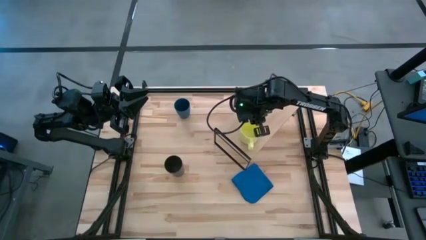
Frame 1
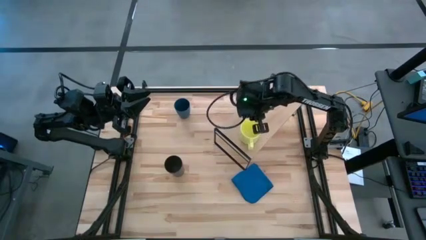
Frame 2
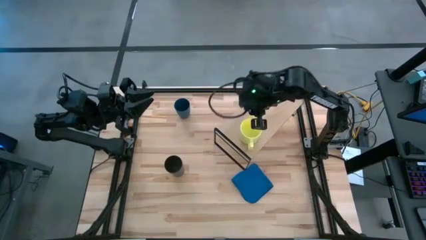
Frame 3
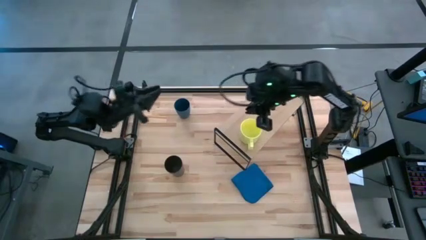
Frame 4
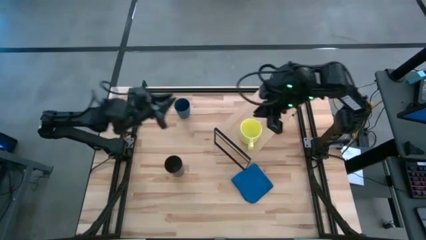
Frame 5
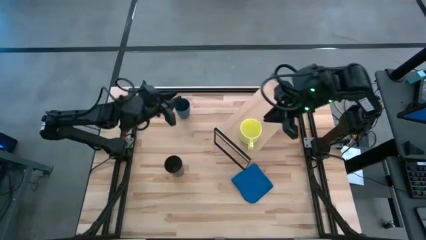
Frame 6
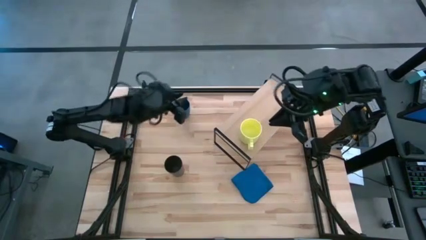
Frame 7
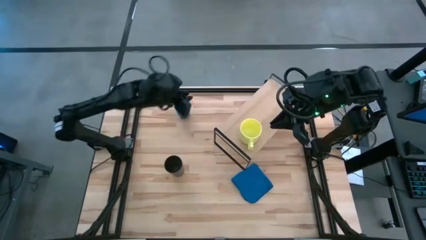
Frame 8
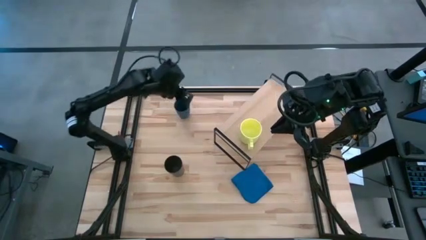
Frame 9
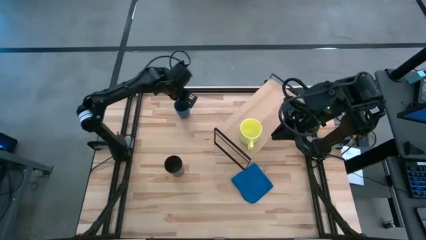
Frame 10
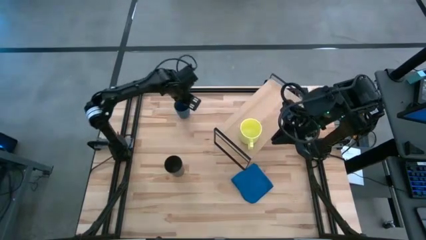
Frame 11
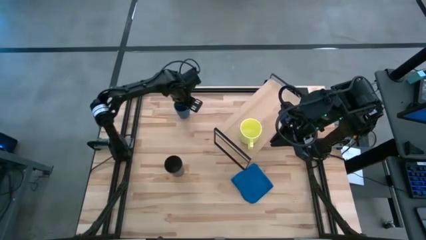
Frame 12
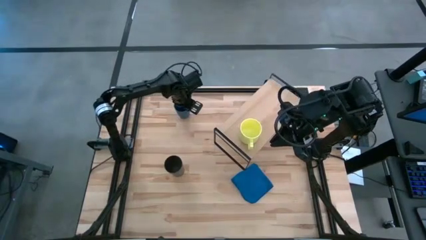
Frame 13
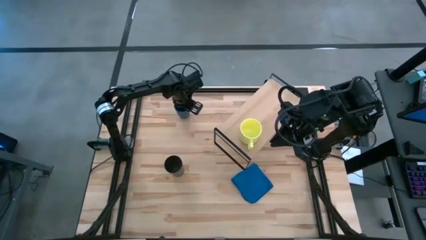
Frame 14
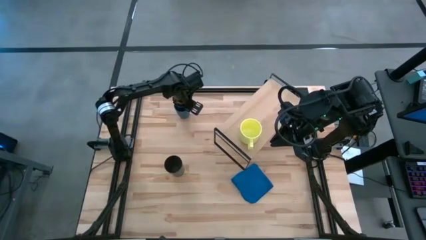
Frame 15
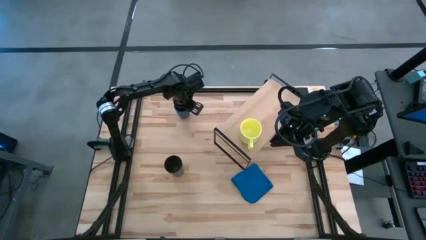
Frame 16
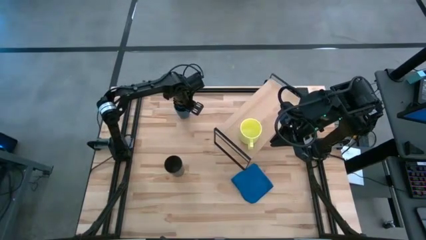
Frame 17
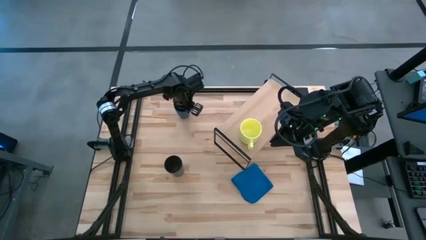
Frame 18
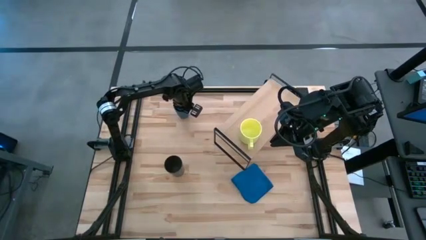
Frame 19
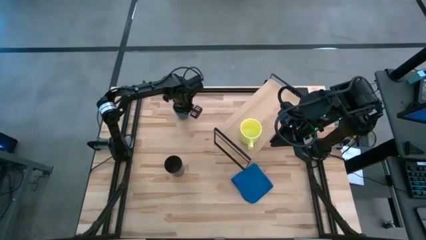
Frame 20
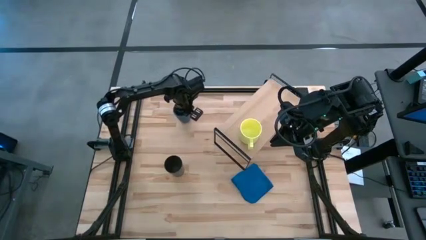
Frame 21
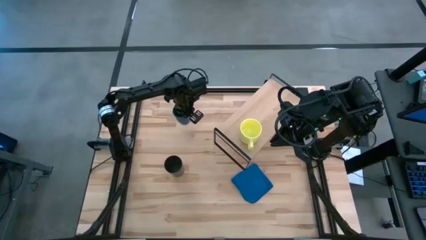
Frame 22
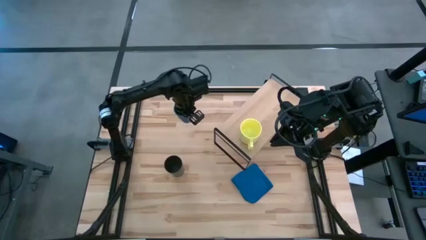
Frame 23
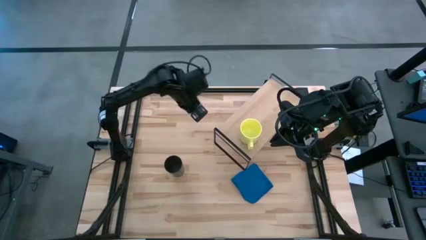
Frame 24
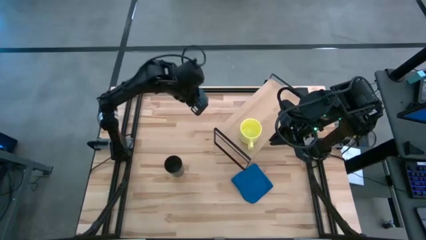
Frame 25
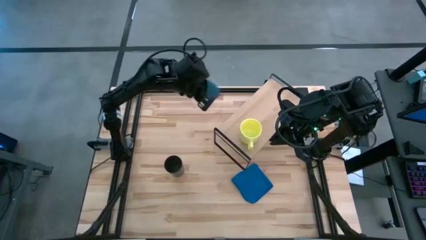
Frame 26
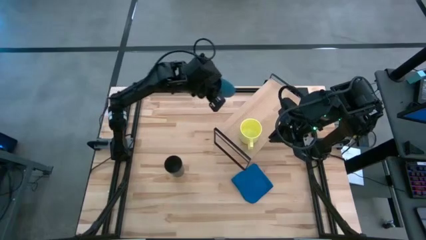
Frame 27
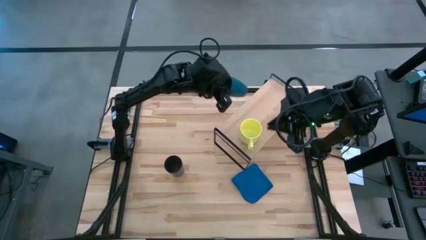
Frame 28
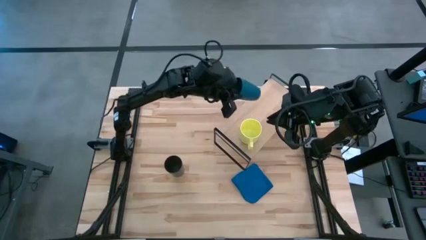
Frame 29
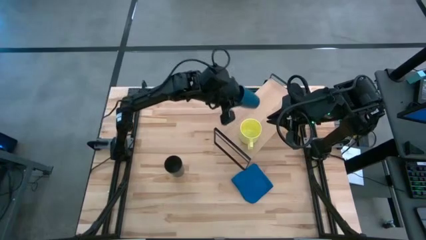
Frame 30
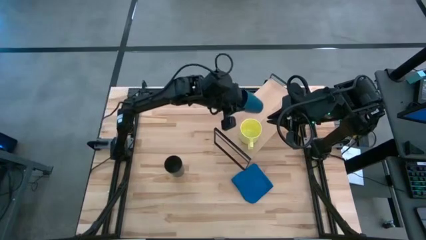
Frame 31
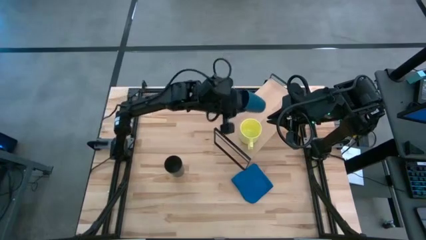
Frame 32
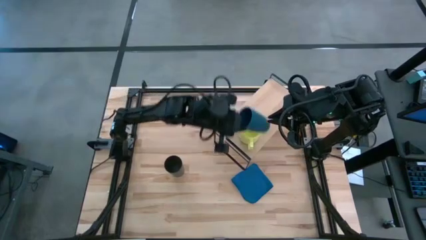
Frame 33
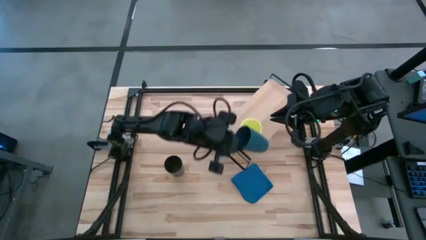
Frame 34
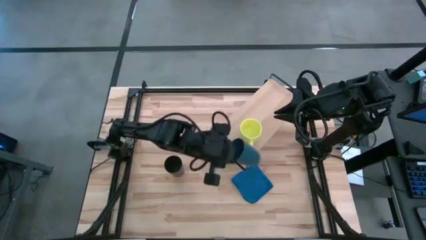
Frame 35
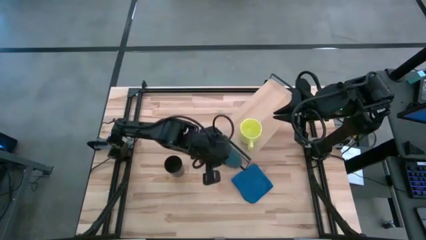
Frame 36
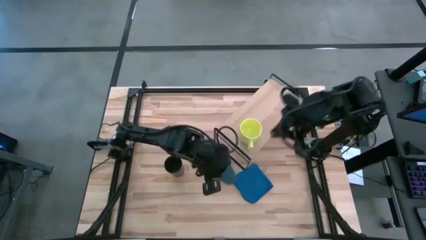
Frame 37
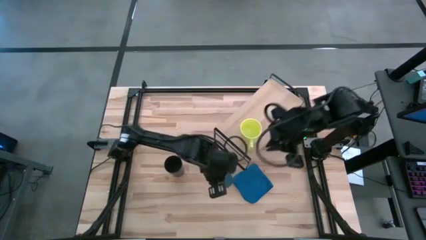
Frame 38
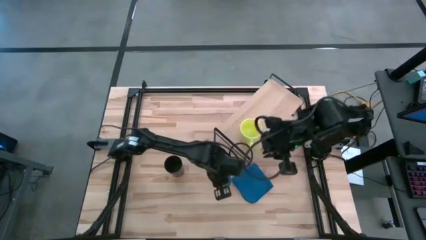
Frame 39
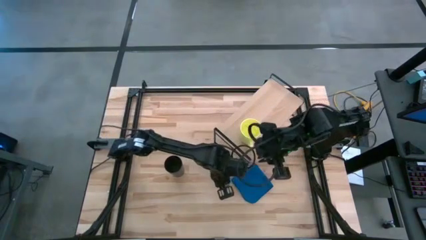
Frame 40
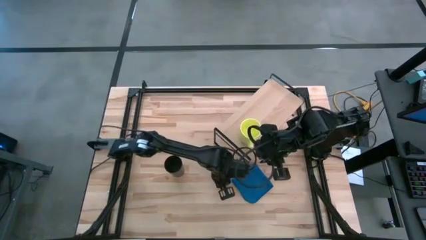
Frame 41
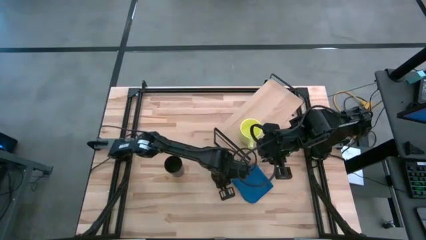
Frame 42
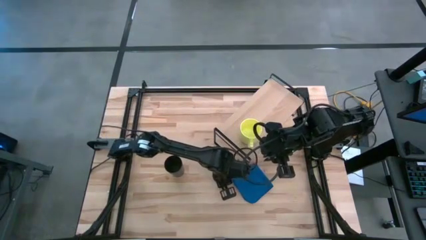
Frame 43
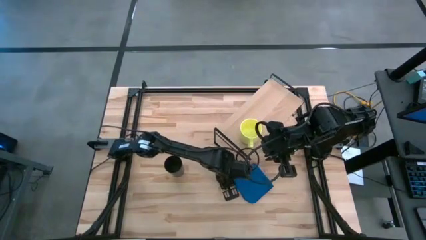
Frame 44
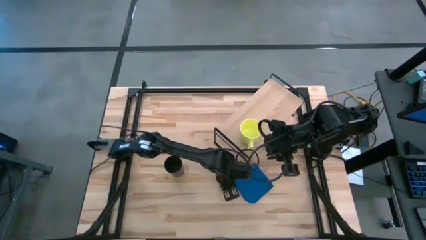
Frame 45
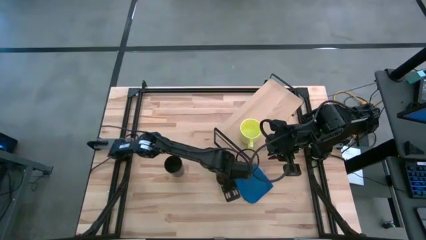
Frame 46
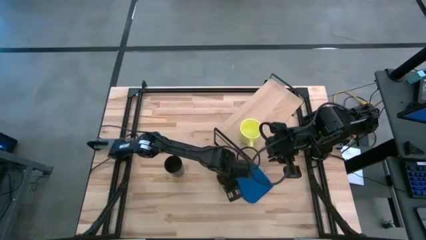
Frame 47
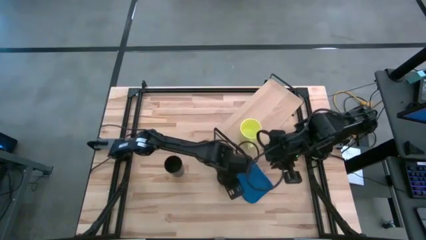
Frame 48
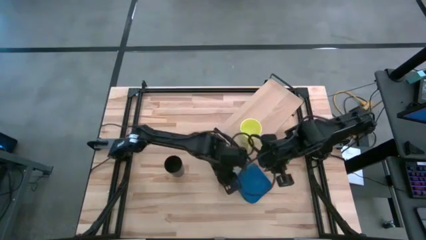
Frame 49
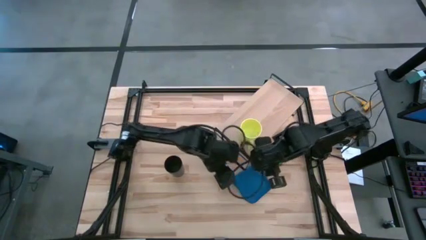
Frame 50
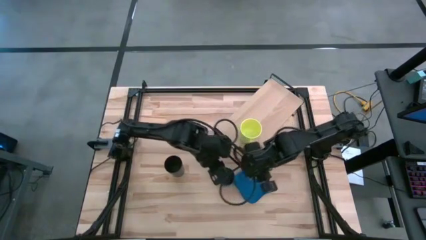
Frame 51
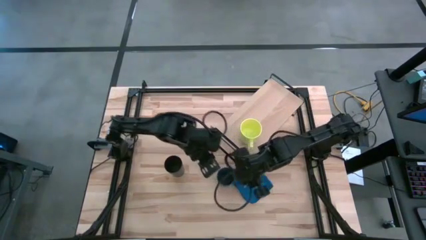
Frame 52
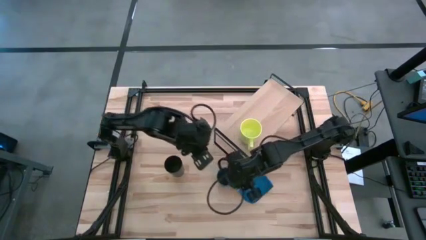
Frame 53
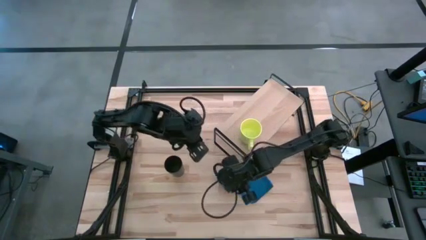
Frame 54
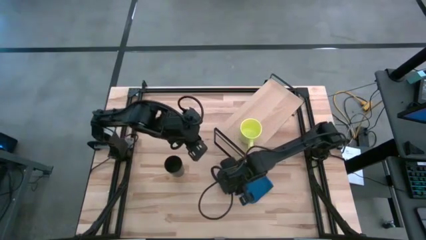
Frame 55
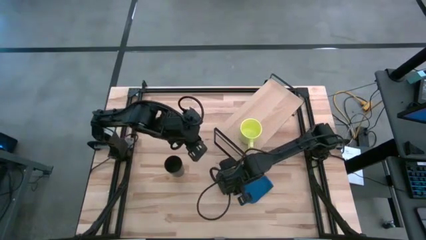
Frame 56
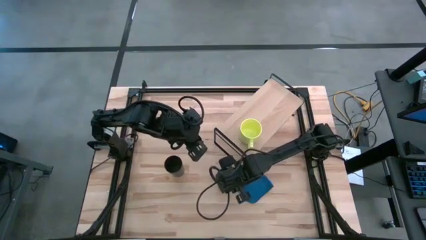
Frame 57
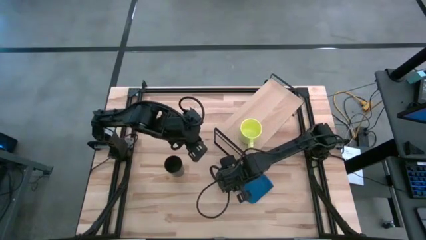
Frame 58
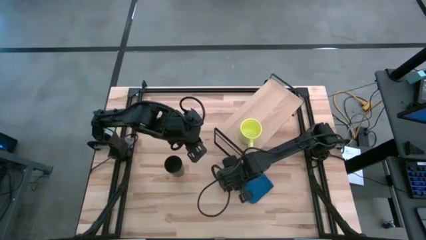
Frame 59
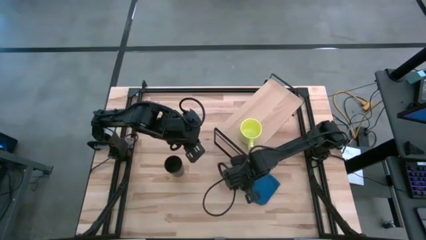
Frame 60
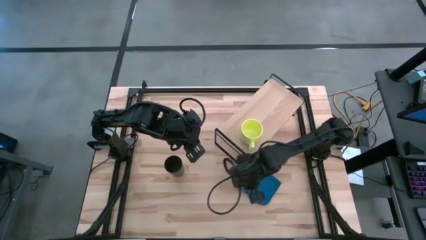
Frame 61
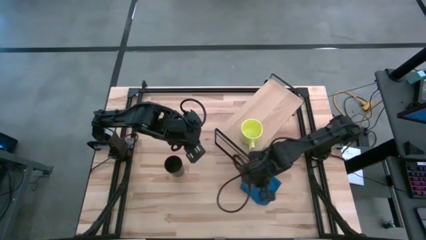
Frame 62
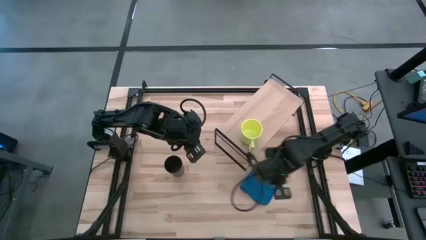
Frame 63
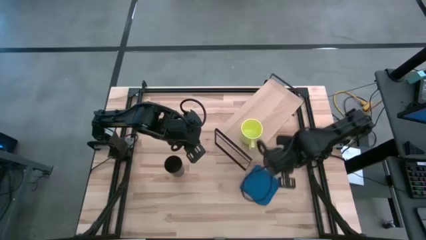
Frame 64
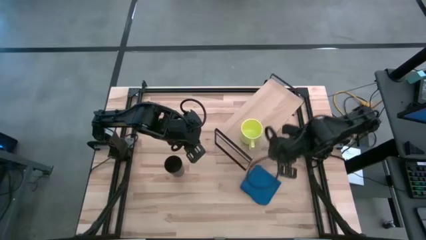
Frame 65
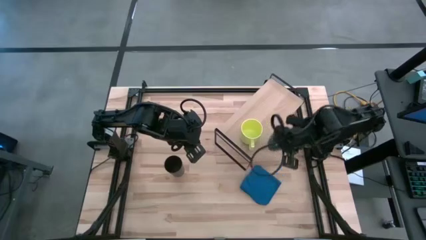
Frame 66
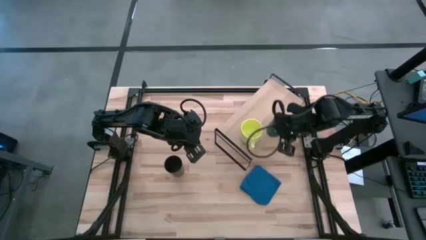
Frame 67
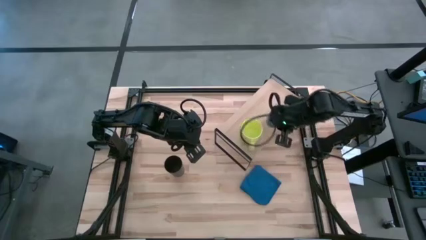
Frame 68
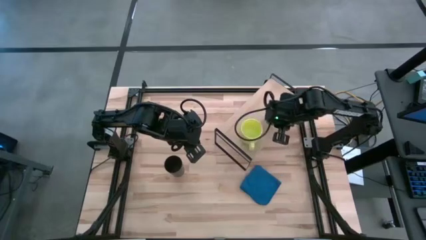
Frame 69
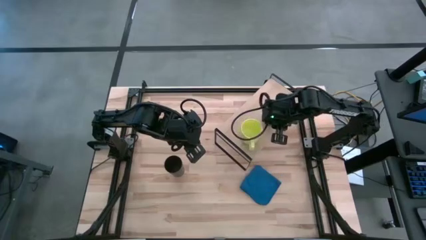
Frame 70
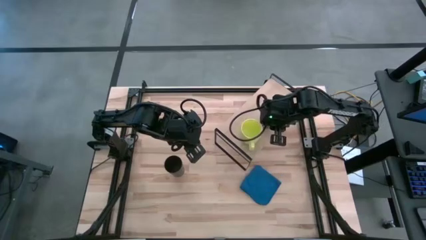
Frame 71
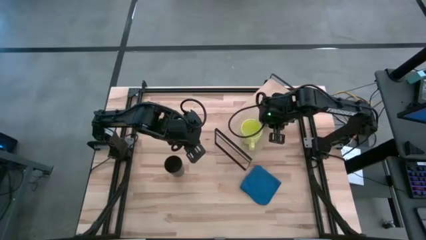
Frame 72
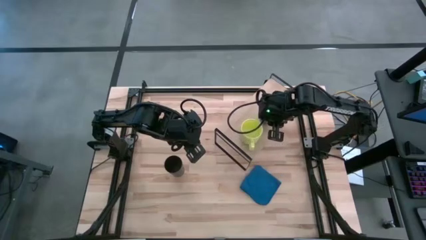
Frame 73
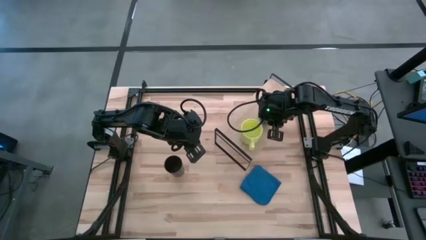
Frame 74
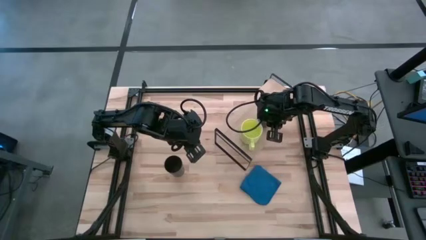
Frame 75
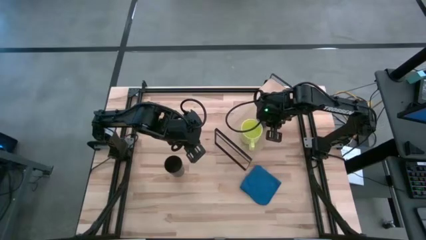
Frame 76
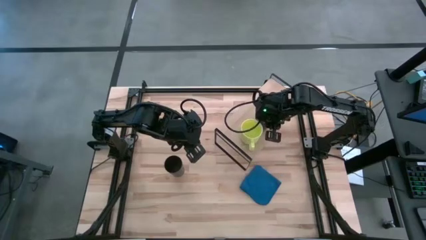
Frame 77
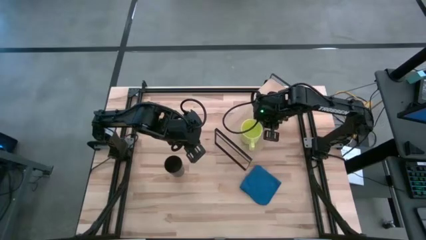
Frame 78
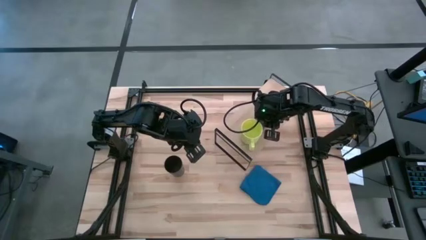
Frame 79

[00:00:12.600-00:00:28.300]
Task: Stack small to large cups/mugs on shelf
Put the blue cup on the shelf
